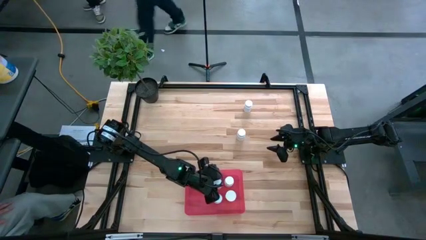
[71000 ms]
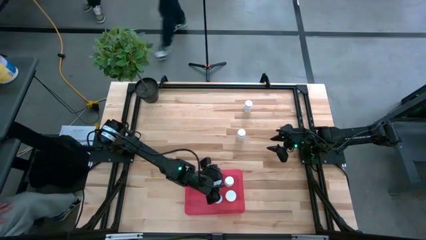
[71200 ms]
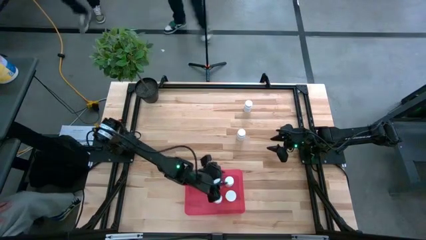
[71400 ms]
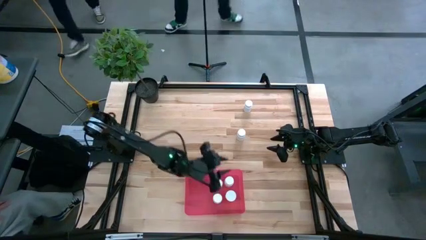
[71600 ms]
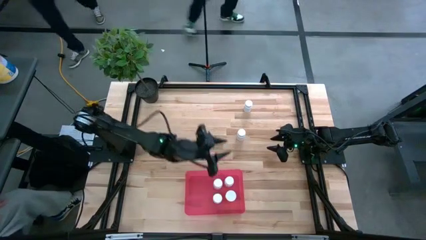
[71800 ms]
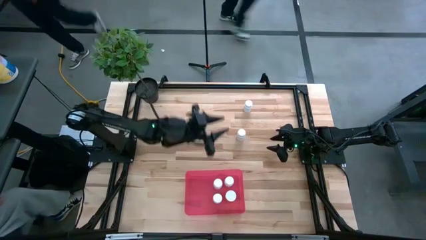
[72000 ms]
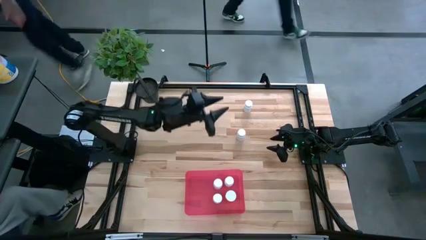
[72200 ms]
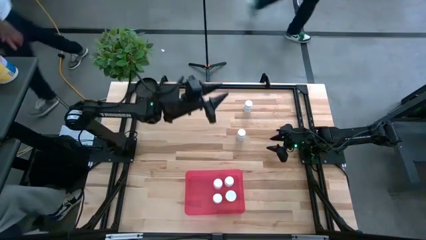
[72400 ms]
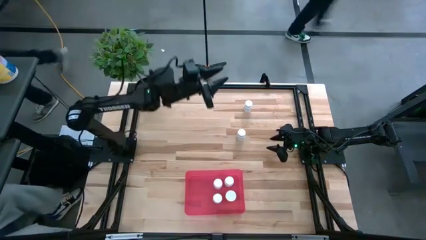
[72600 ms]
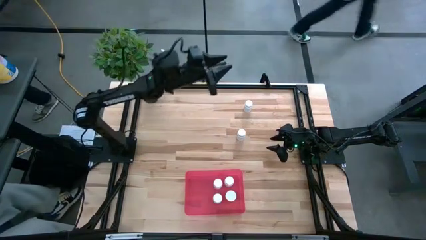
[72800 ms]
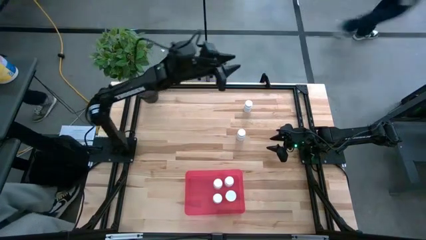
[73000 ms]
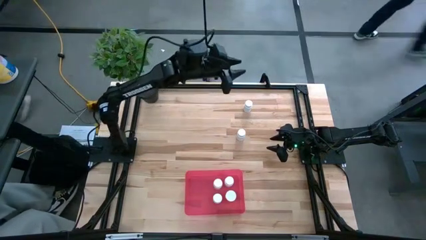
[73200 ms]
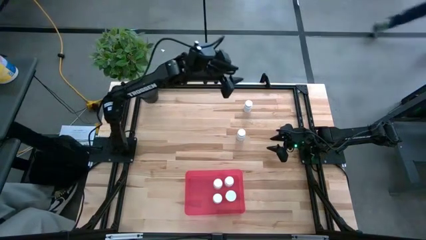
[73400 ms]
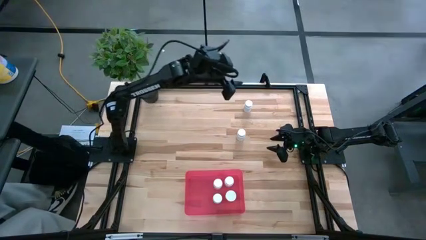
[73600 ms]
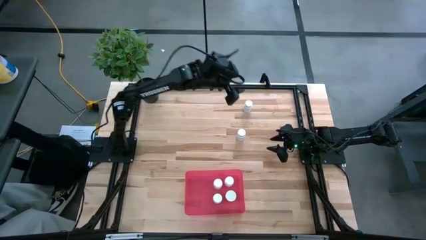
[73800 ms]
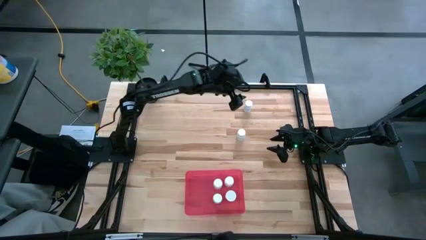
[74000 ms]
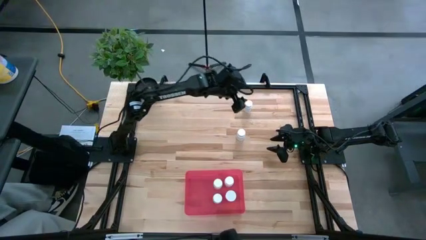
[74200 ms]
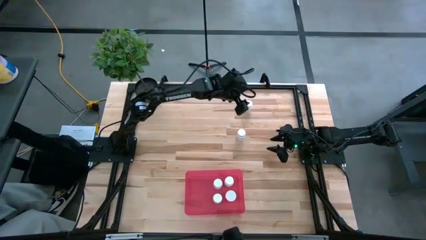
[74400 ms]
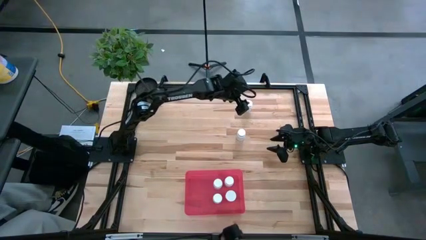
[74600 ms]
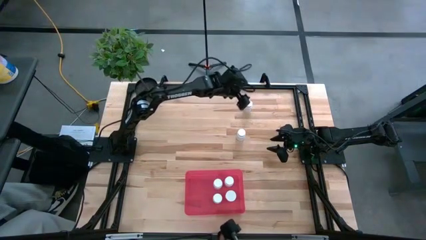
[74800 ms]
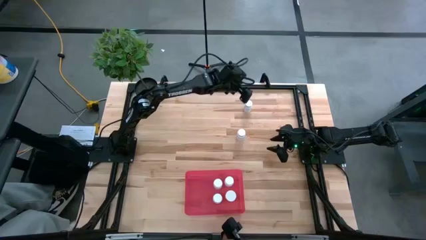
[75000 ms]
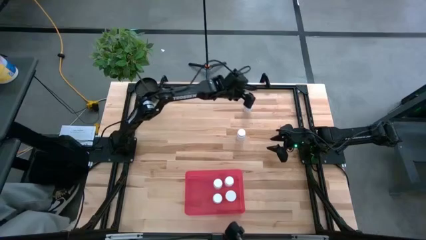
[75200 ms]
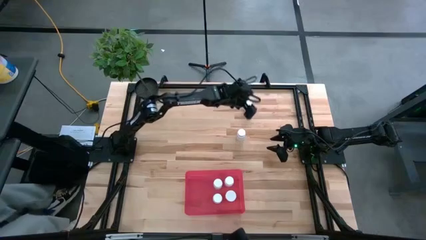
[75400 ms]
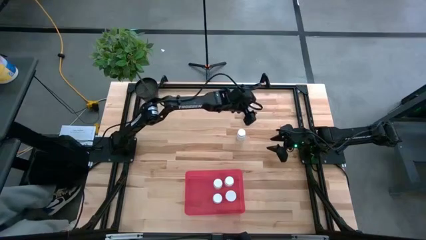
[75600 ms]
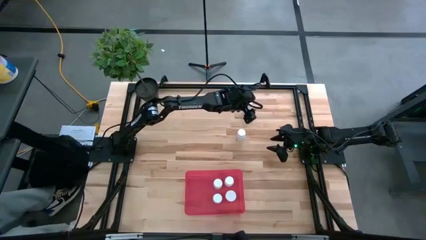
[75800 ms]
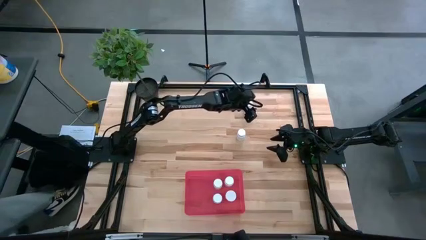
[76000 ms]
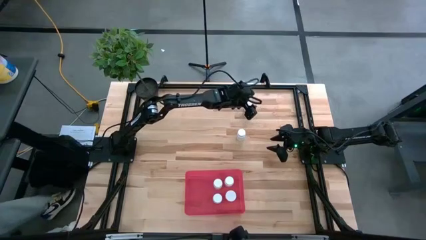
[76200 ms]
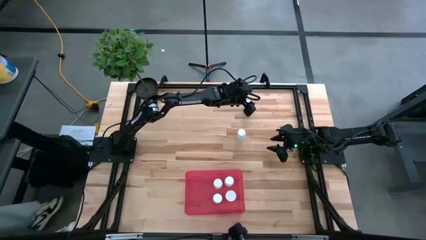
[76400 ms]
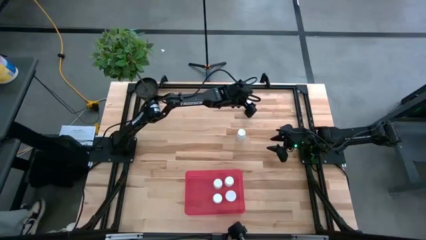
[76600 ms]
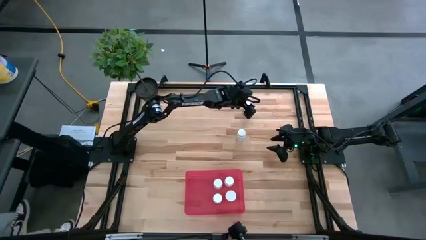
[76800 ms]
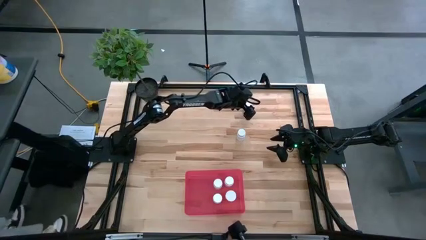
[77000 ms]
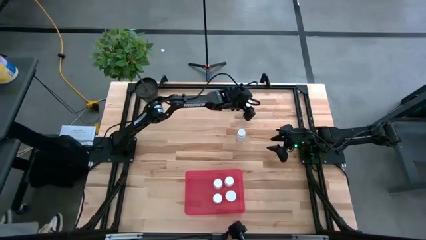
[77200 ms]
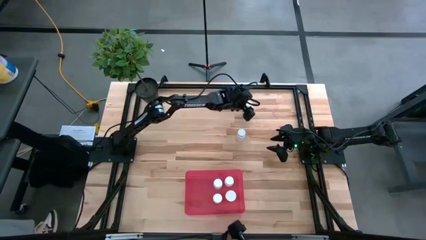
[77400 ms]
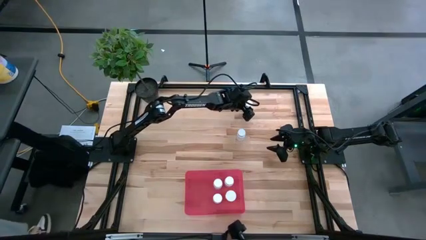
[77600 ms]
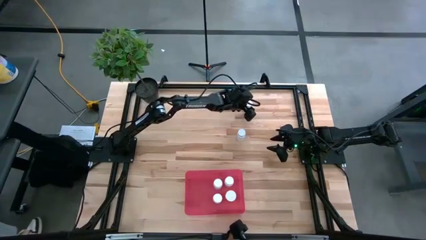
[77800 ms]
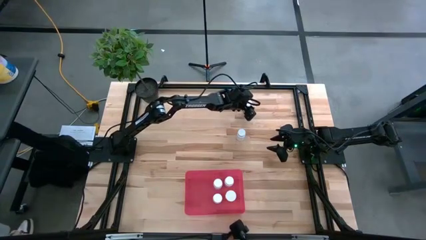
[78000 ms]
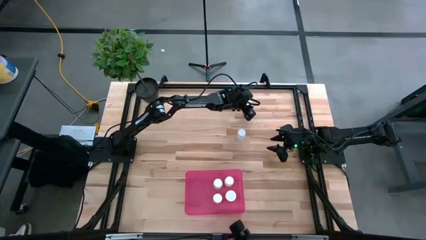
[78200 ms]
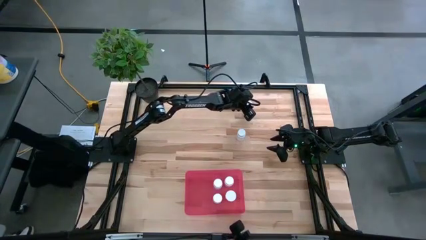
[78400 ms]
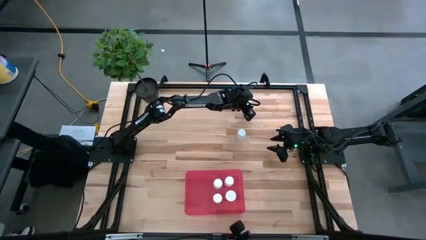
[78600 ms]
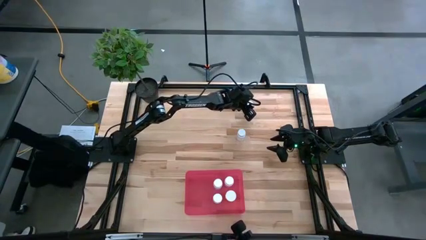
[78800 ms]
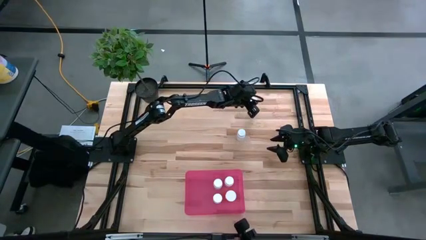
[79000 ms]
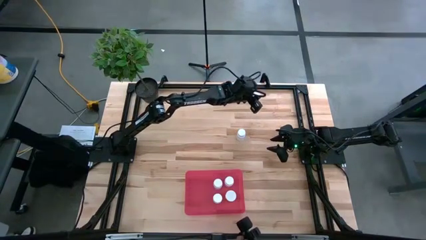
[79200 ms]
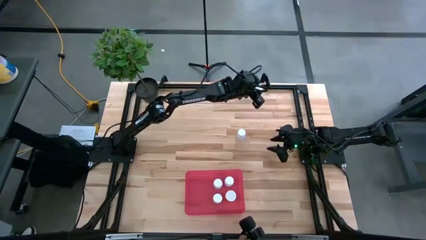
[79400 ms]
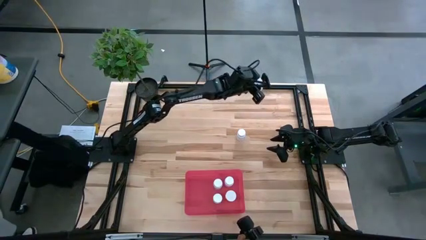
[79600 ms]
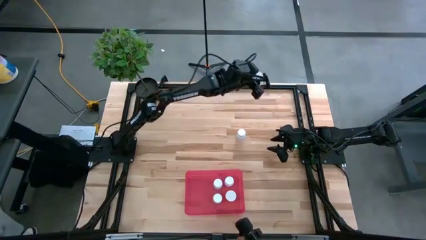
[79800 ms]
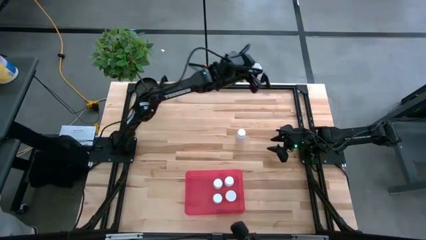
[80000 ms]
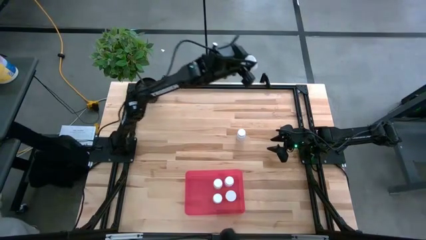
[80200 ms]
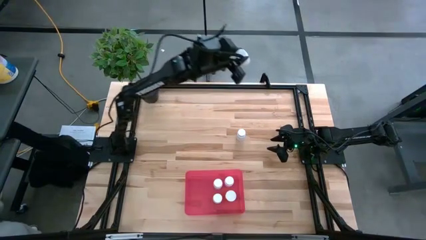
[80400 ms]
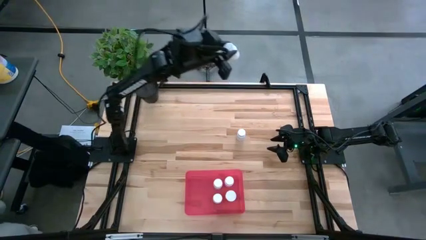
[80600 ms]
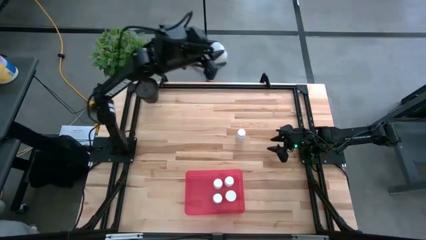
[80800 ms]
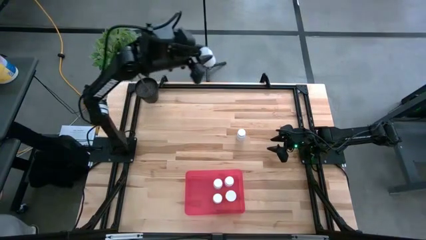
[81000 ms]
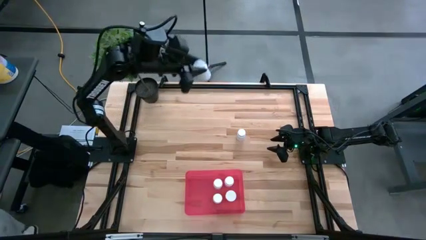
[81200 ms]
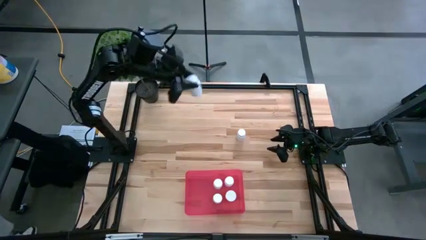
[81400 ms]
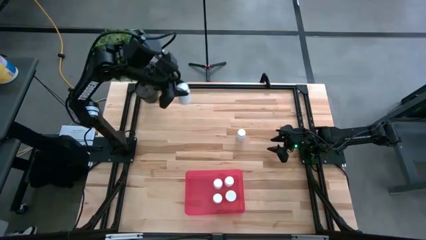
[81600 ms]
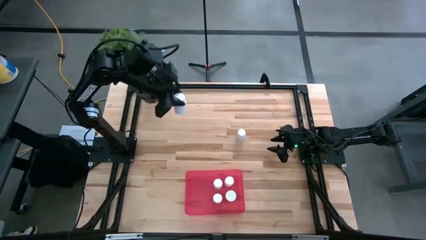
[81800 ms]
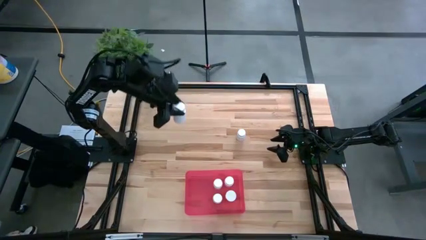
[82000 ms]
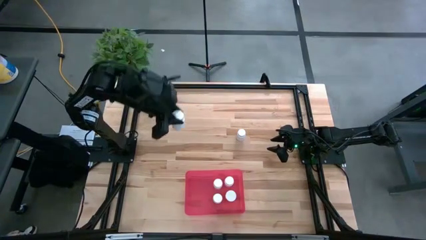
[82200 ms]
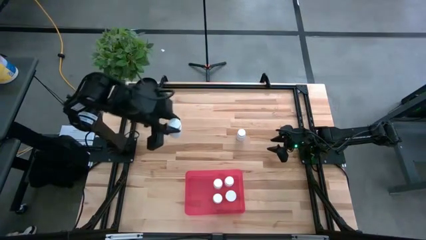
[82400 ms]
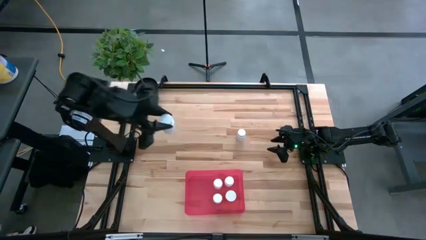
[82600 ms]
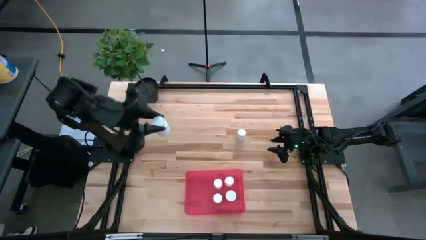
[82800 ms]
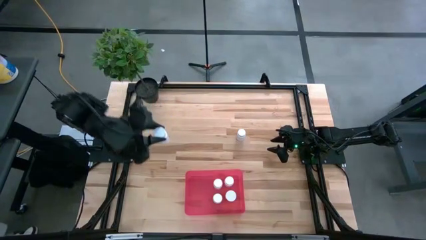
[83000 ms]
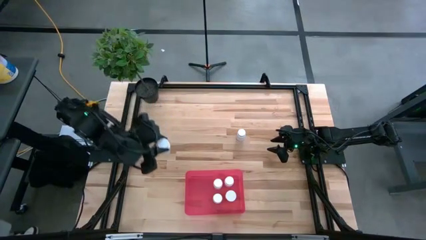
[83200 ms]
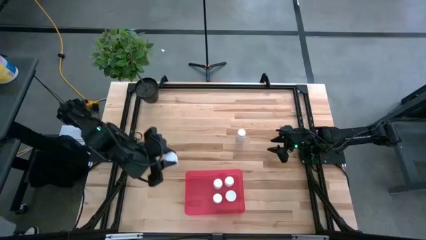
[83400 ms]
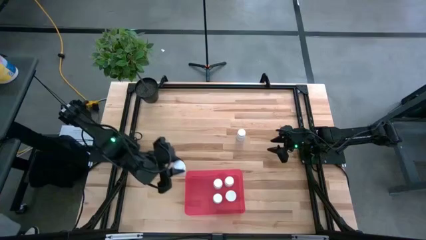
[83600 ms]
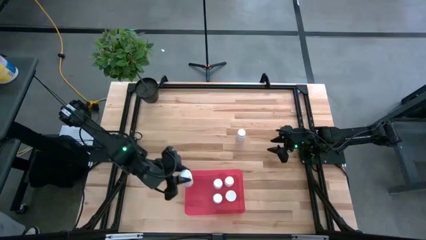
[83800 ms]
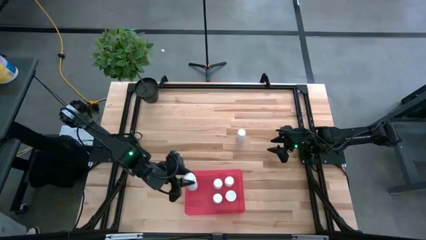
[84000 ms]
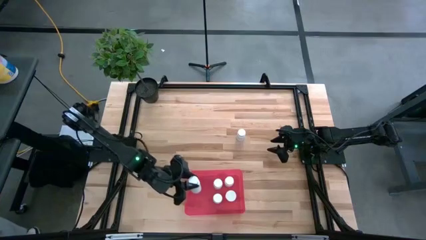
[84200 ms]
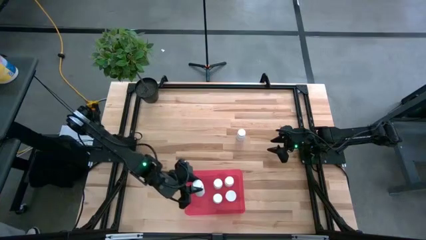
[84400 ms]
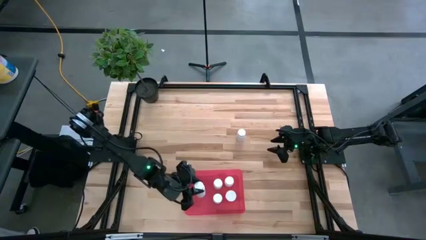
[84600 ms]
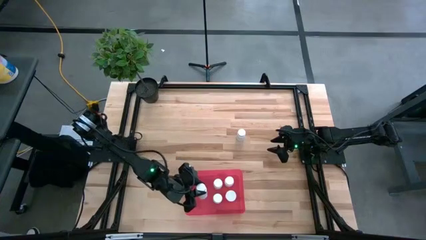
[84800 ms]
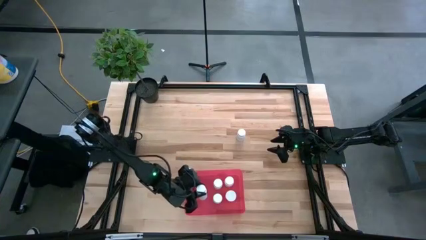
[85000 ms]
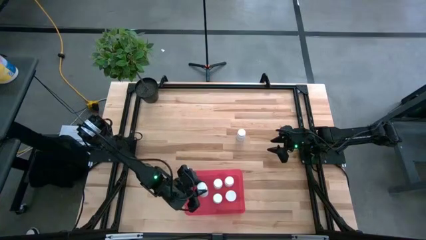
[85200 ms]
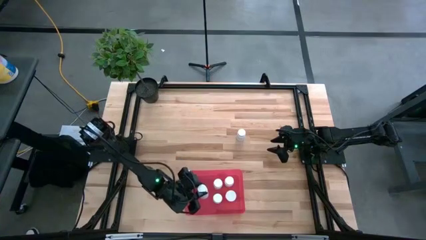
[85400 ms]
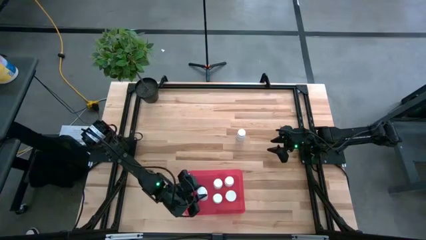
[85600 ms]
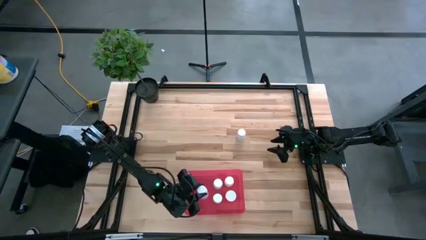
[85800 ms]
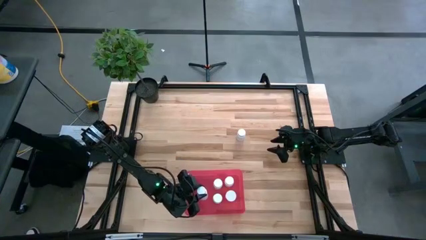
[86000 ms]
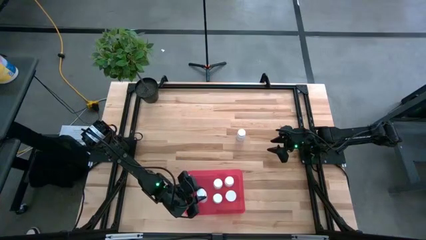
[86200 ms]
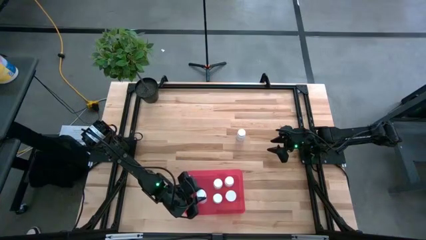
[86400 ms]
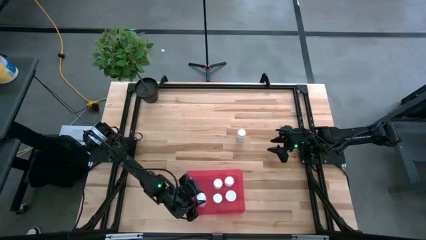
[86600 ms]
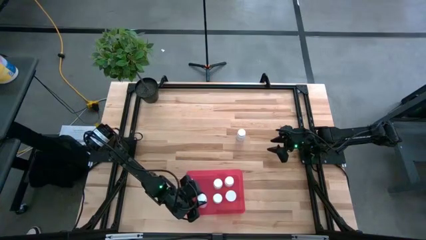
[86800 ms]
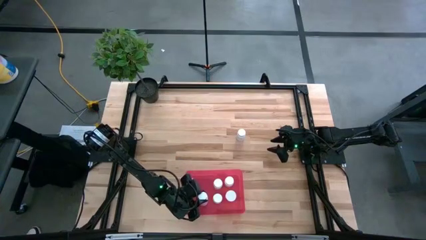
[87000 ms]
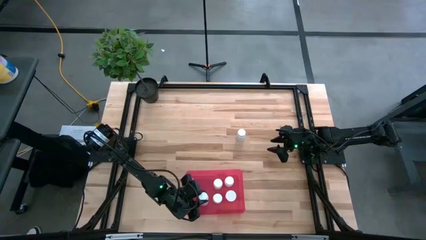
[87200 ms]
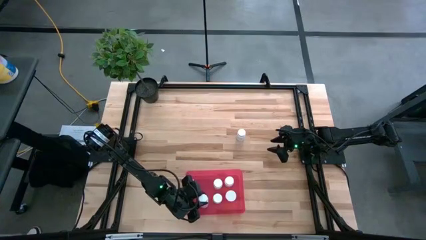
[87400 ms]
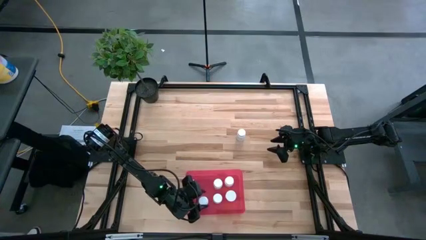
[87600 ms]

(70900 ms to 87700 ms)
Task: Pick and place pill bottles into a basket
Put the white pill bottle into the pink bin
